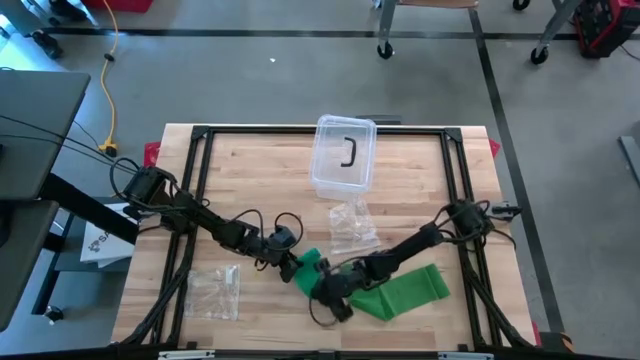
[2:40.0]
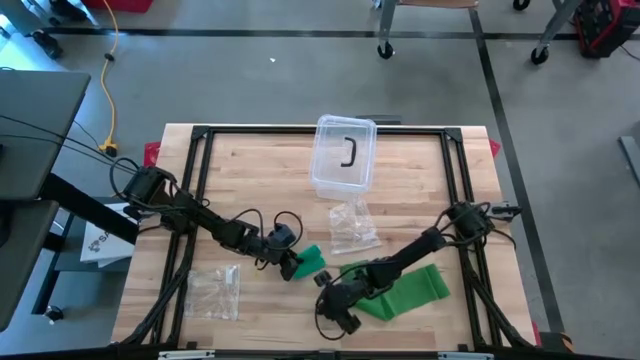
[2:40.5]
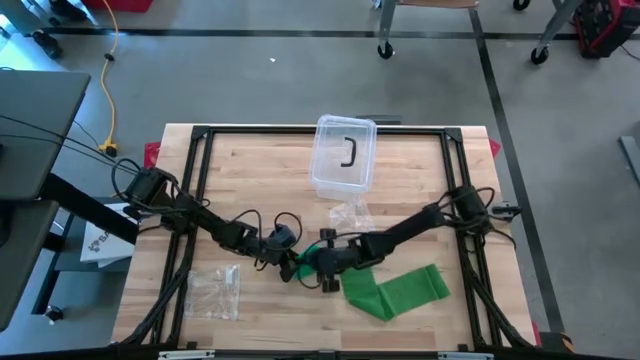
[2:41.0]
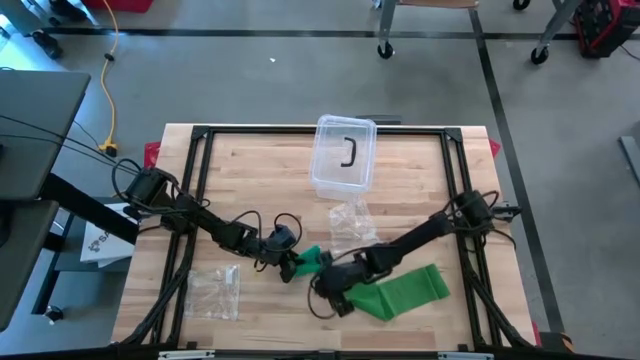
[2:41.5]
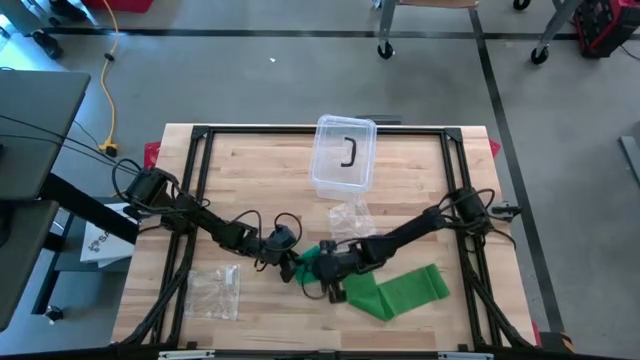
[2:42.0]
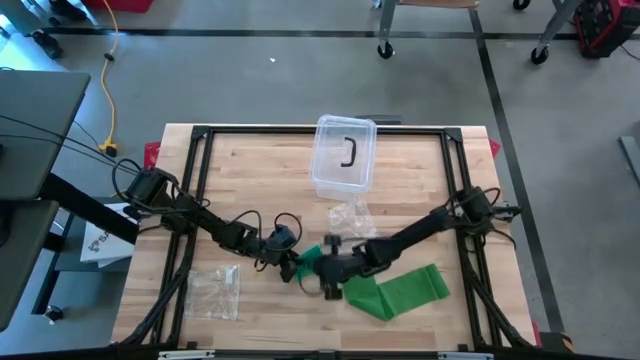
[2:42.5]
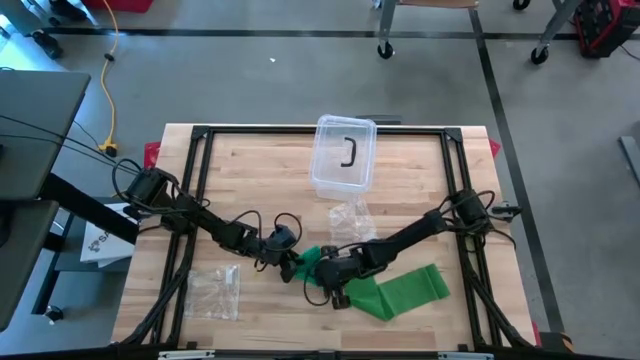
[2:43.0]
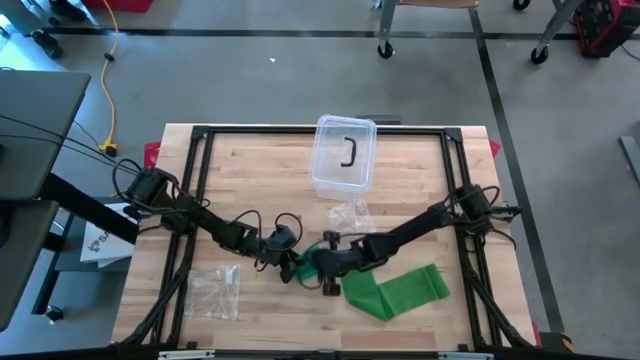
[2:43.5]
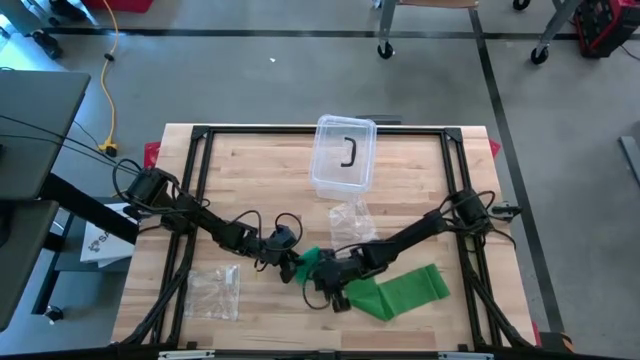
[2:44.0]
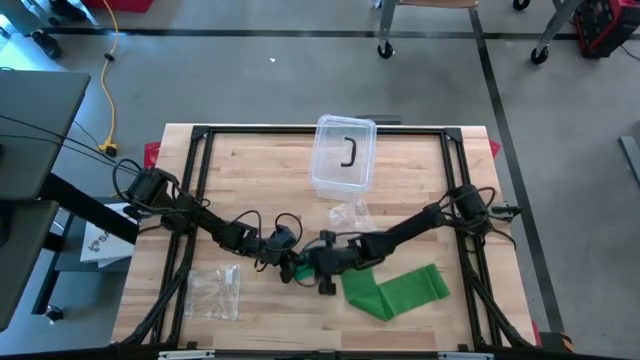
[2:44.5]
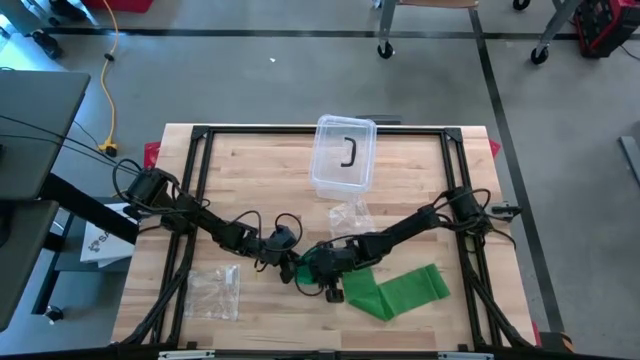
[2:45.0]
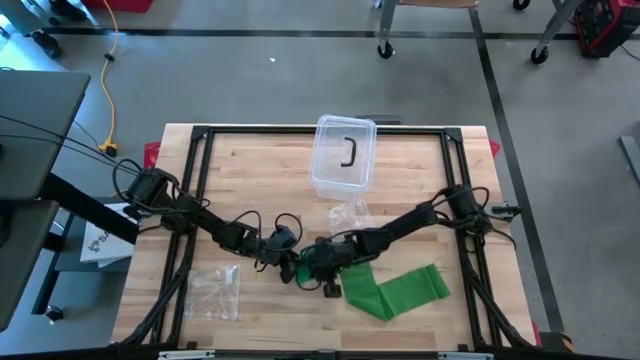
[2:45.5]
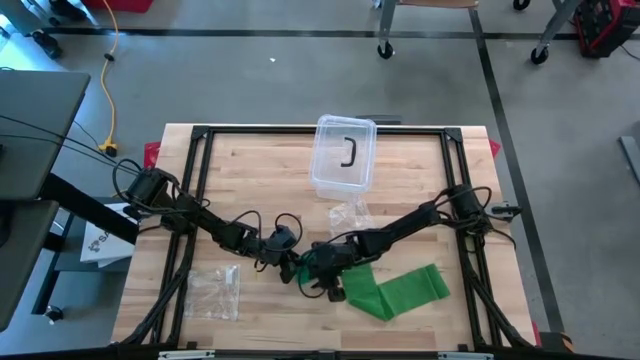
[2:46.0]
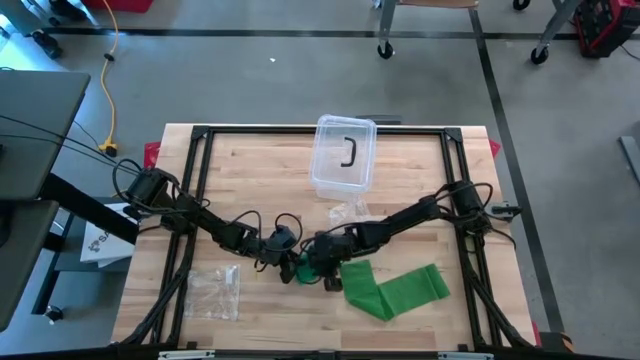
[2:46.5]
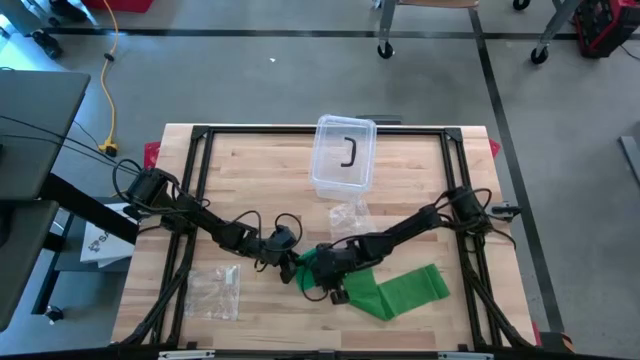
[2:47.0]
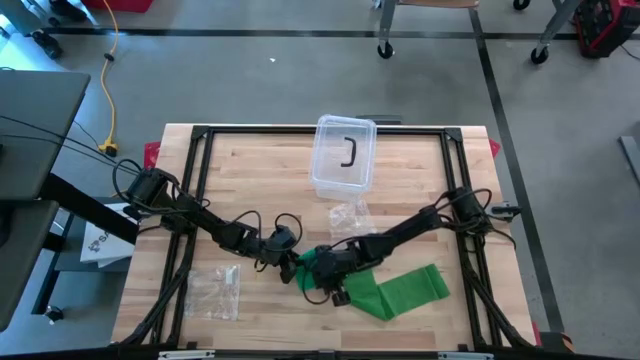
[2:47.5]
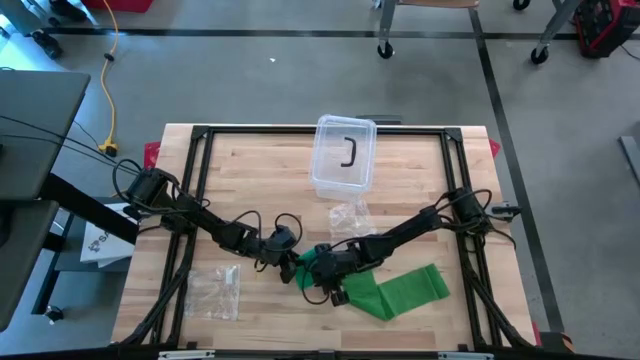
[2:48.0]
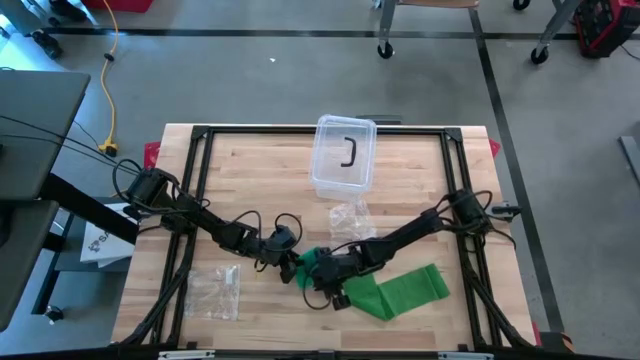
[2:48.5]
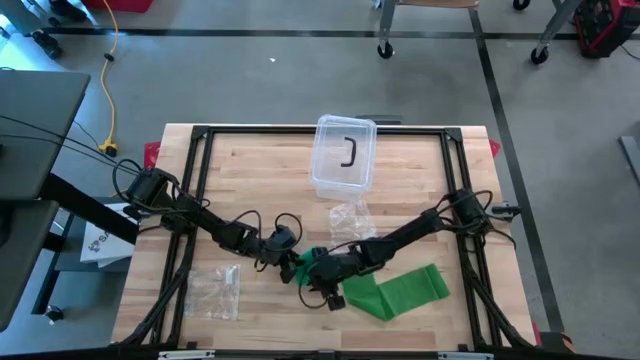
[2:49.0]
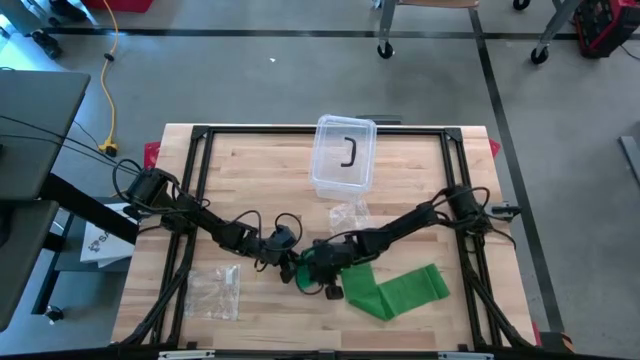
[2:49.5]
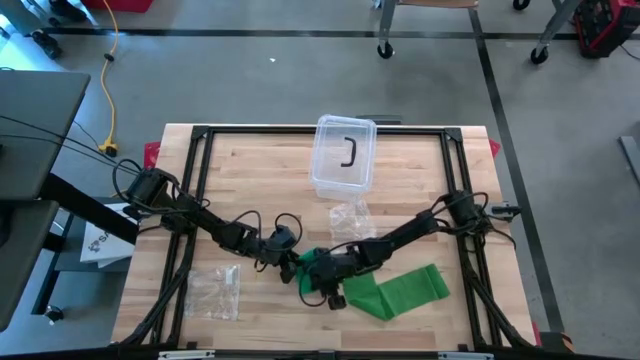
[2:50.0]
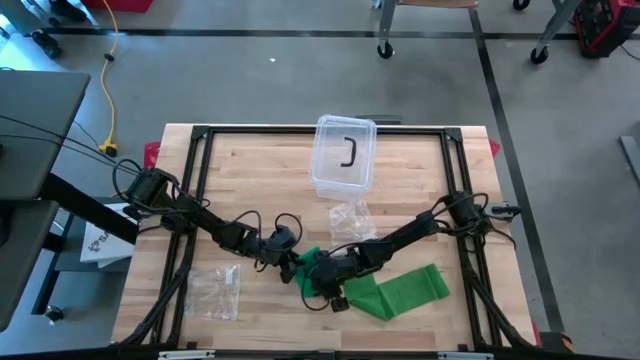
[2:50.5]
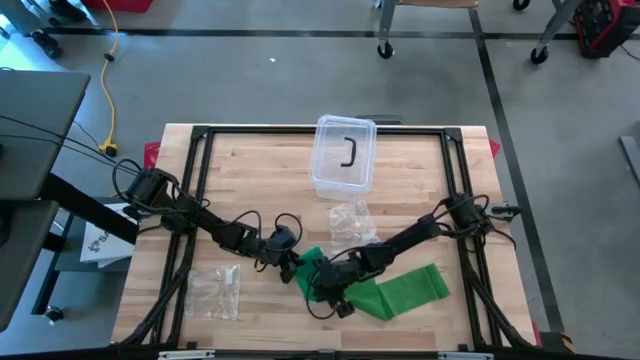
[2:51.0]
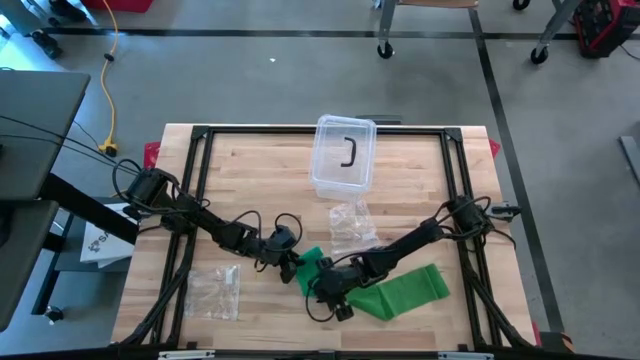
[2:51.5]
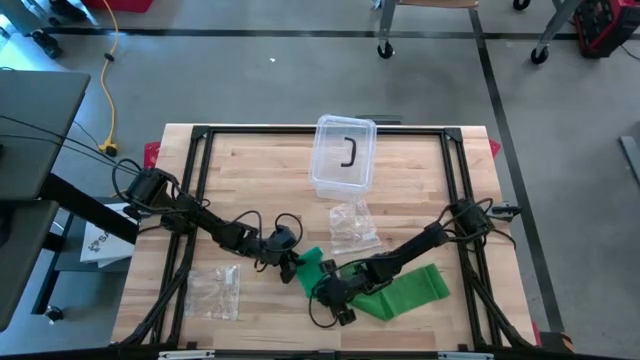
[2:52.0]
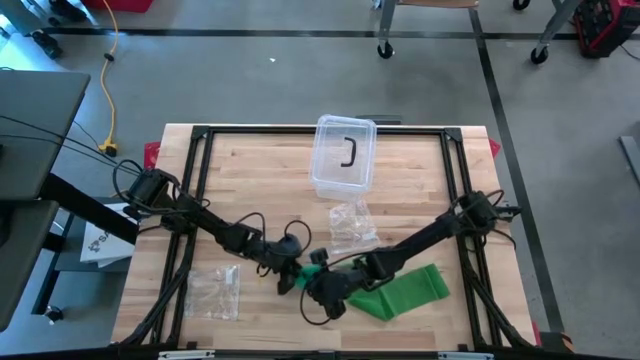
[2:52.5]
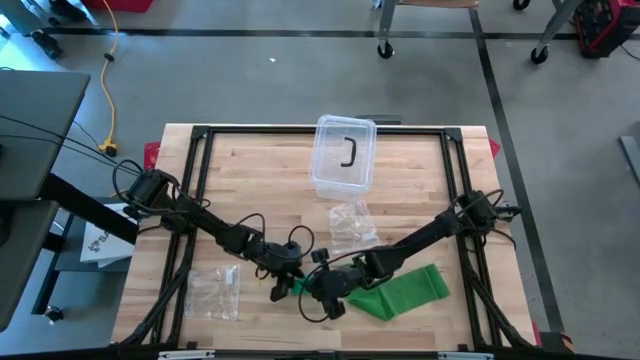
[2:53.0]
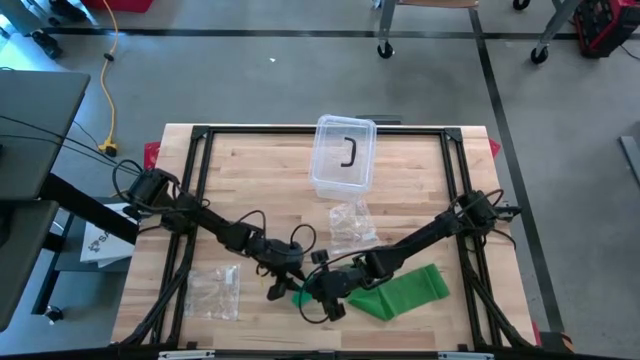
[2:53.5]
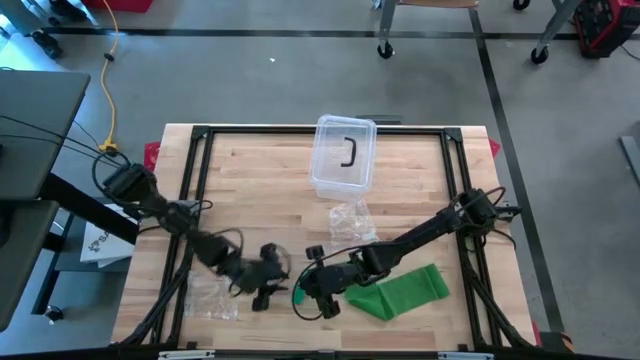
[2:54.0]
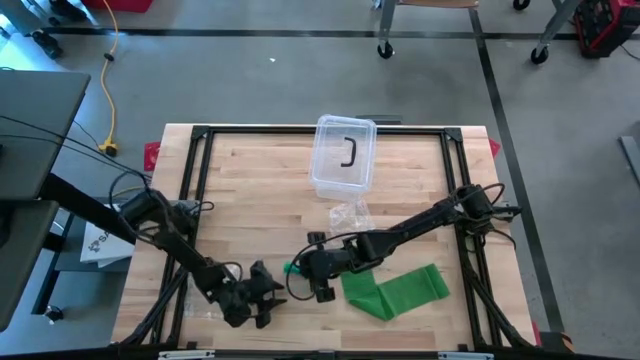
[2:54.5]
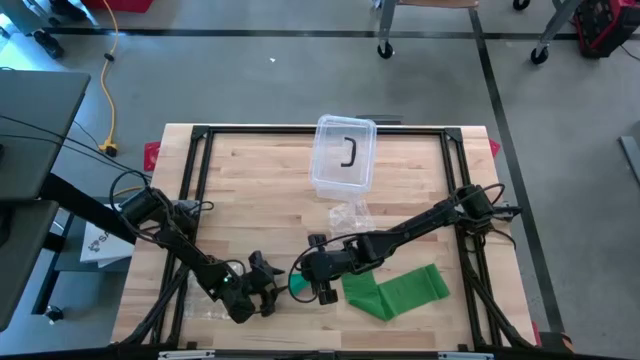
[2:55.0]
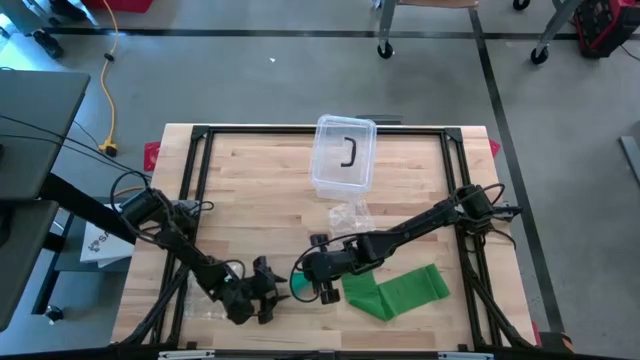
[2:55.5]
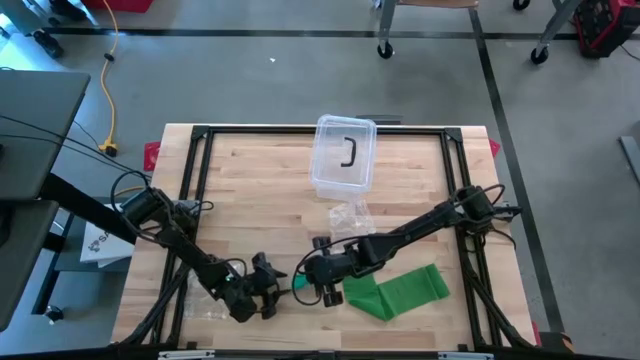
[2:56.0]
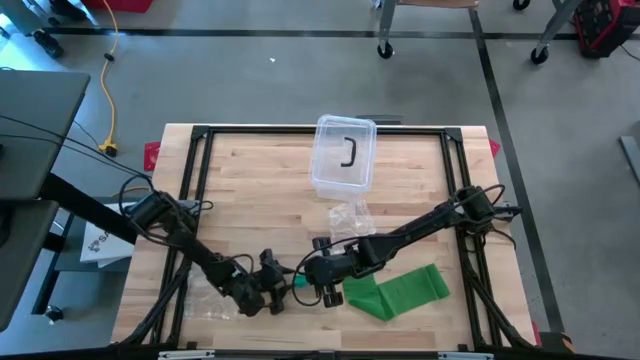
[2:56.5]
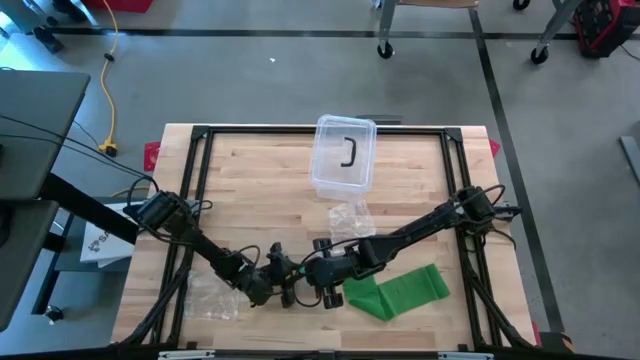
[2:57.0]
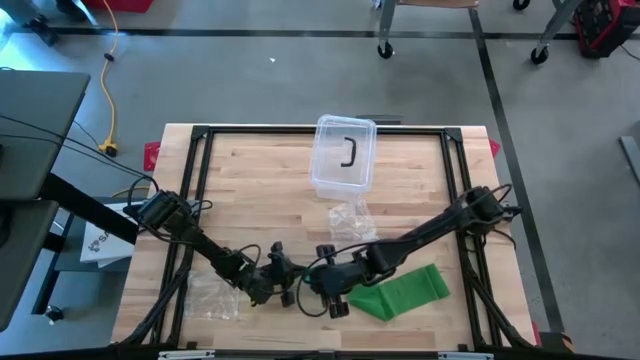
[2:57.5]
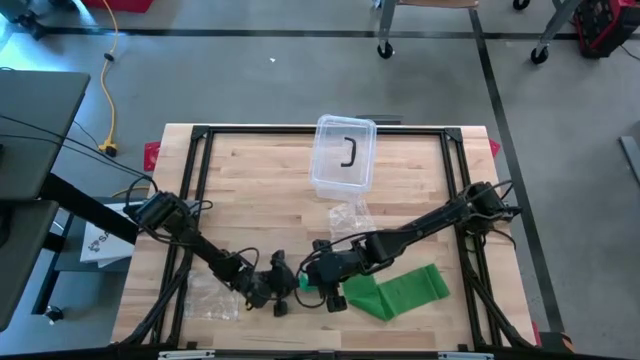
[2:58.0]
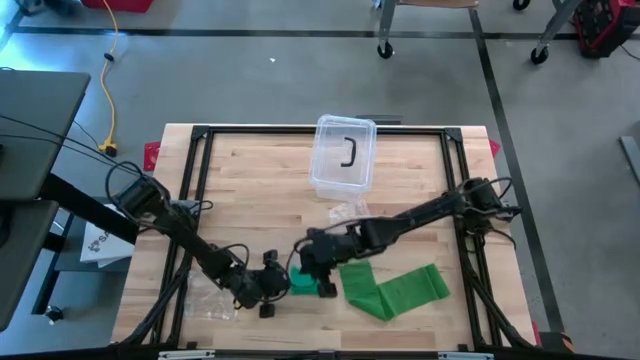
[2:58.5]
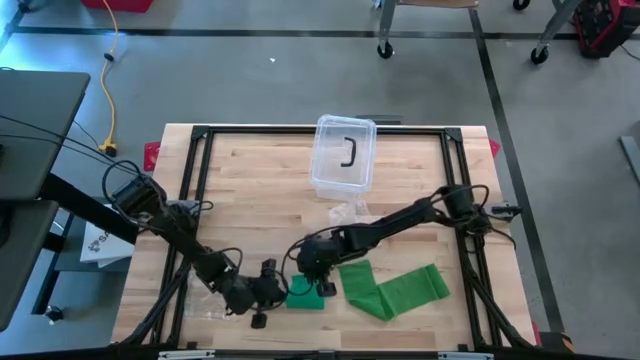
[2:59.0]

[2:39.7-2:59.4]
Task: Roll bandage
Roll the blue bandage
